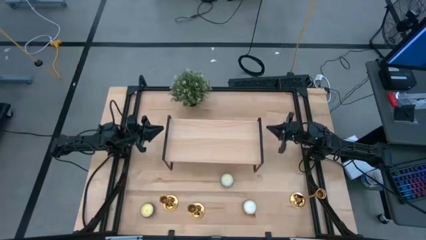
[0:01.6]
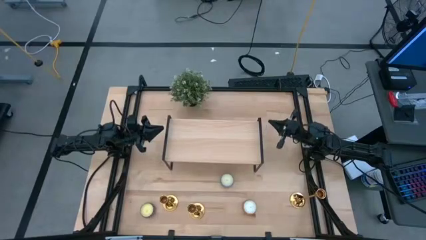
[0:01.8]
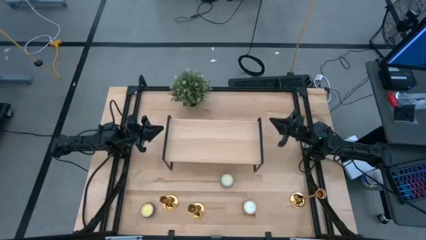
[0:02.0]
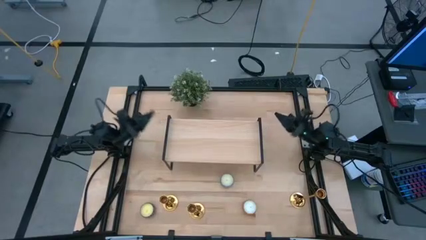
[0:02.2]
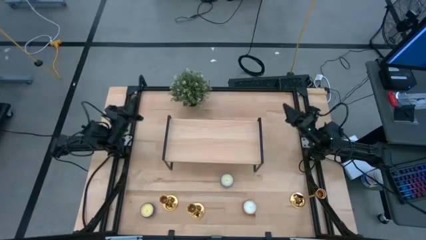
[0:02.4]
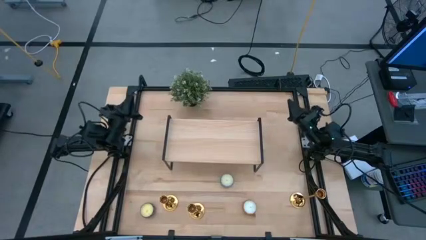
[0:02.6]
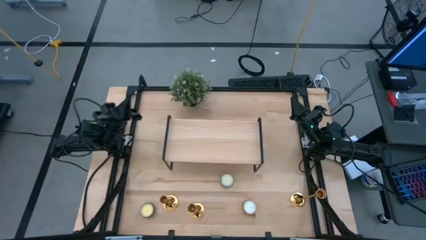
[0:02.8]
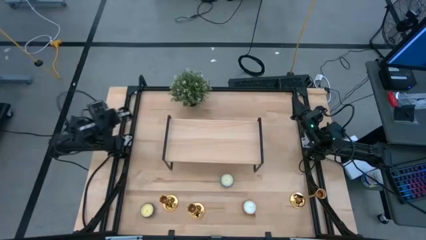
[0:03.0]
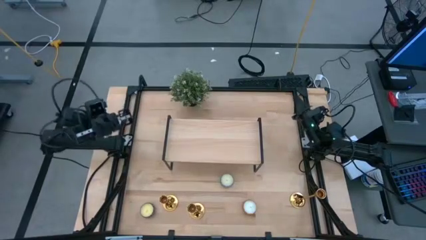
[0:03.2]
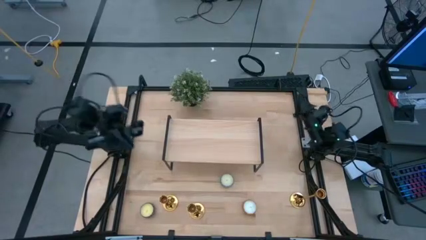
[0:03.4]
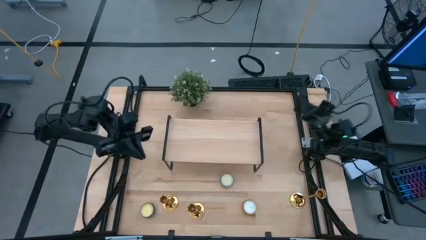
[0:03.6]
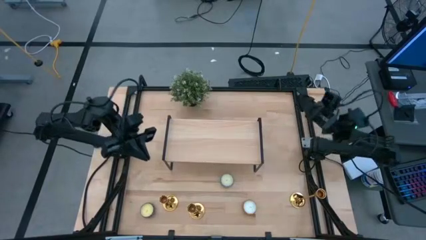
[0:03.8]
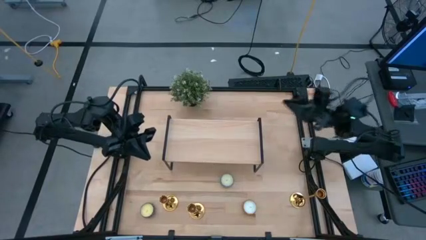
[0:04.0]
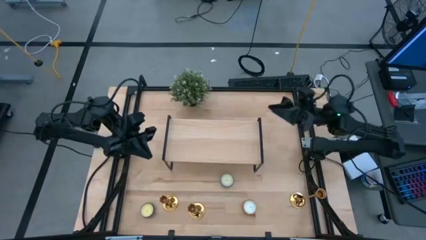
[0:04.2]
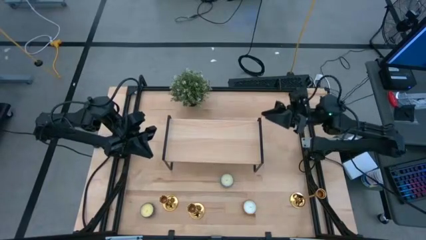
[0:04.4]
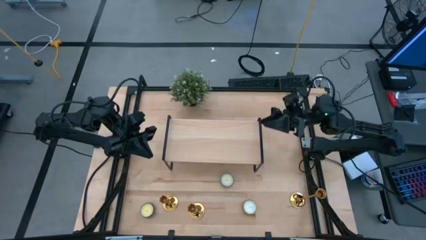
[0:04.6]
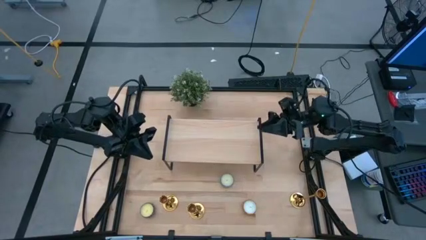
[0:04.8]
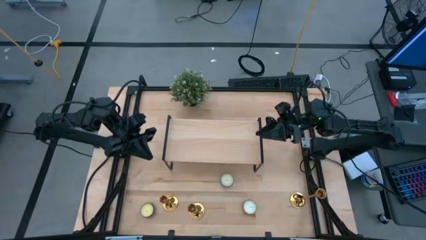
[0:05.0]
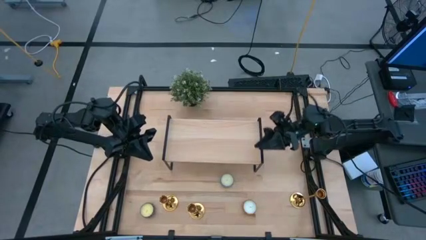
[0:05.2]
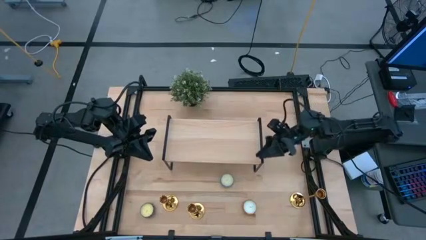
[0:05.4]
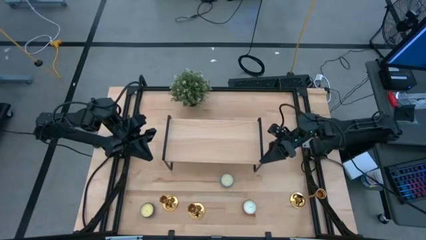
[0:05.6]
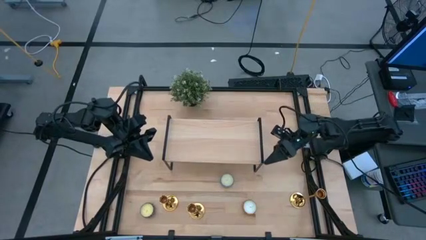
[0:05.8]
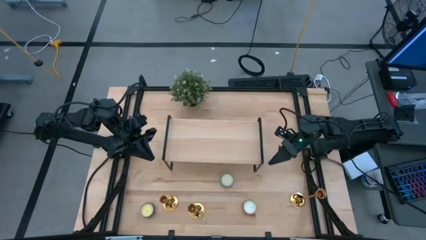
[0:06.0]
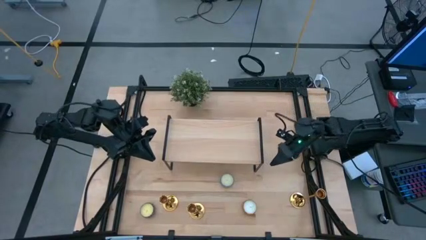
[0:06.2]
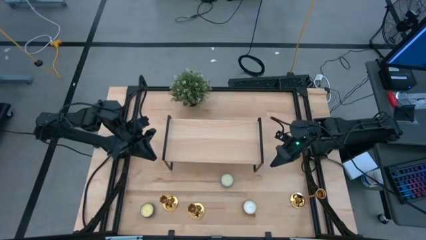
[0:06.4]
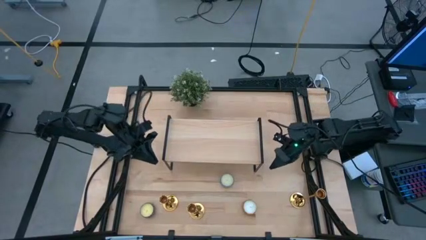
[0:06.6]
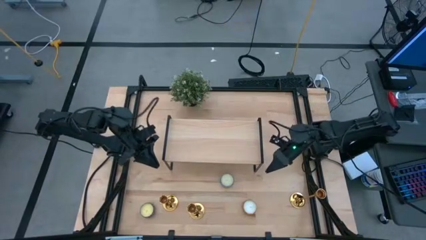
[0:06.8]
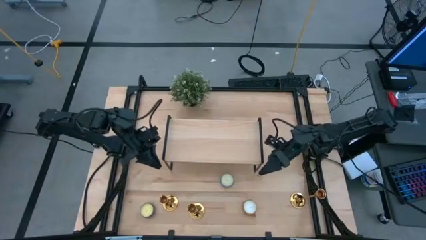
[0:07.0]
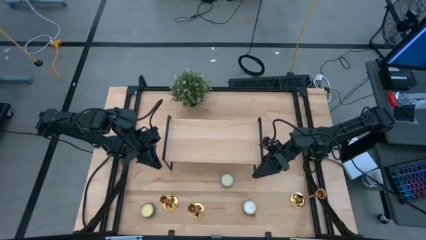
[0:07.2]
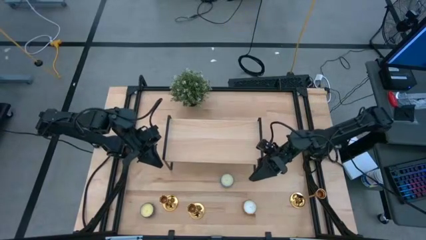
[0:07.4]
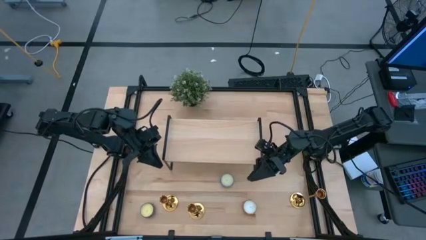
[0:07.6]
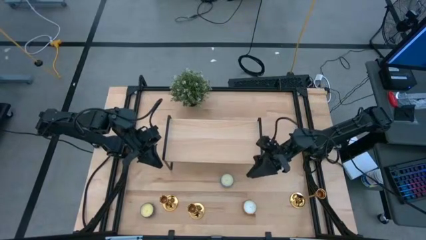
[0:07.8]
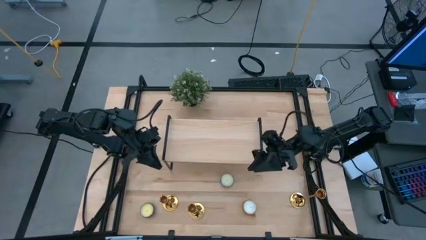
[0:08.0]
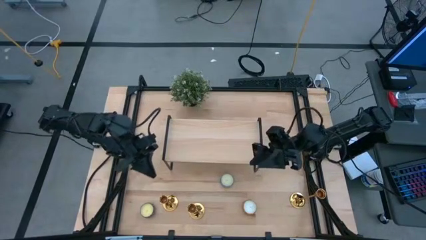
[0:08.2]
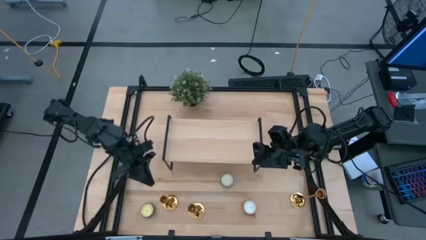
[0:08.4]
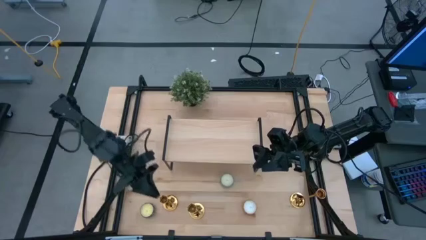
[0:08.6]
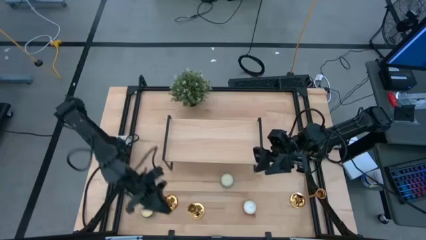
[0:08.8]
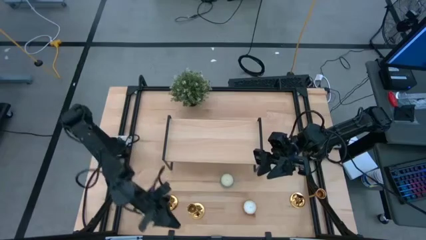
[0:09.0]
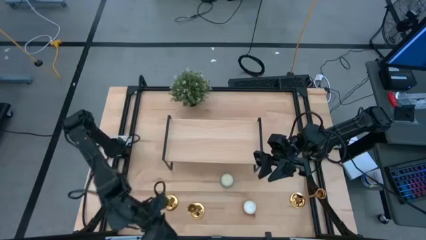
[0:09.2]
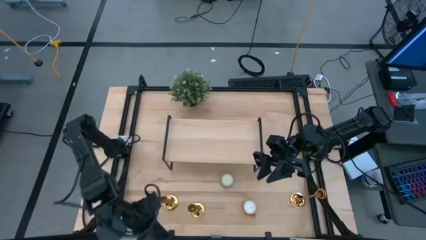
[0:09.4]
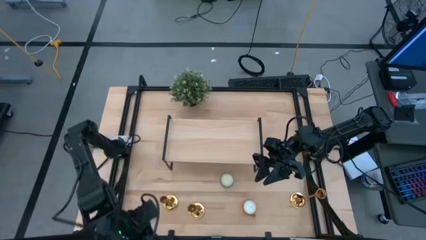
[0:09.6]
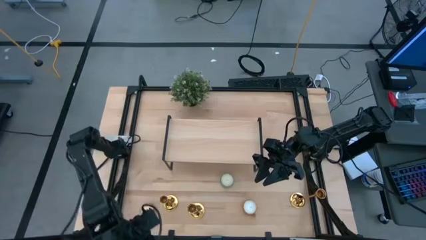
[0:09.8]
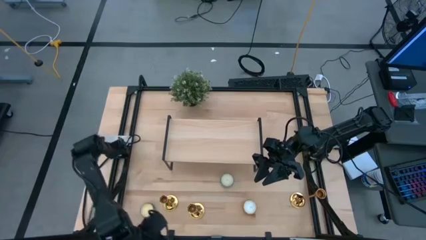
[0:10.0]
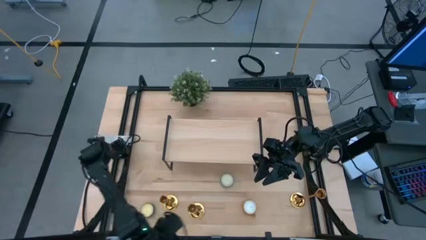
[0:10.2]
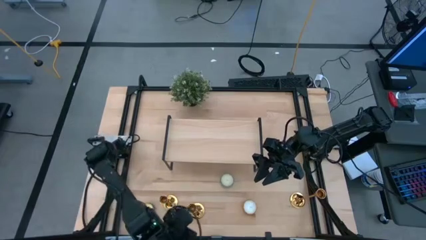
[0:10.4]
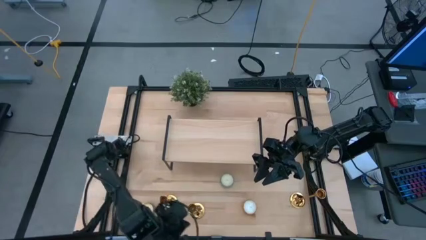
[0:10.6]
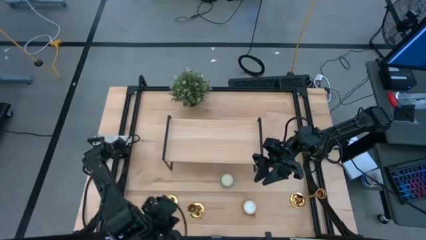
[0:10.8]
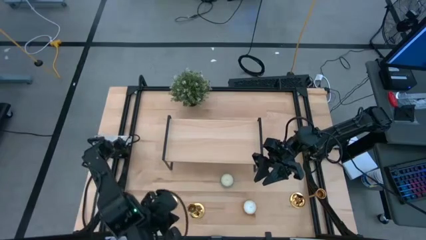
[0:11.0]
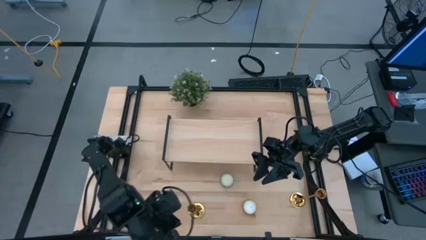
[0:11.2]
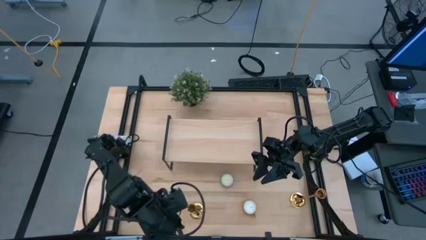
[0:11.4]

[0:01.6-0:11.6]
Task: Stock candles and holders on shelf
Put the middle gold candle holder on the shelf
